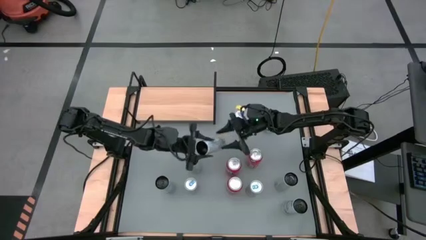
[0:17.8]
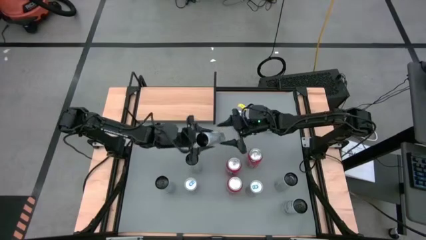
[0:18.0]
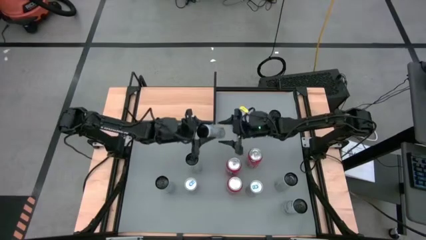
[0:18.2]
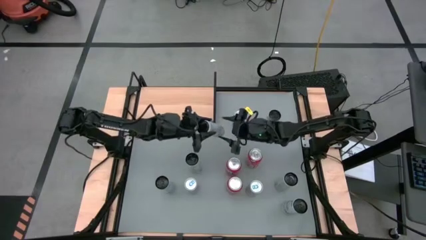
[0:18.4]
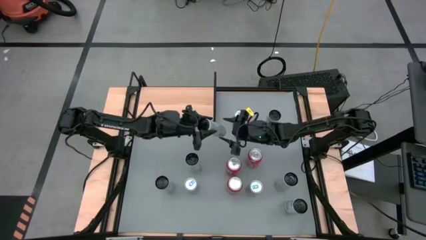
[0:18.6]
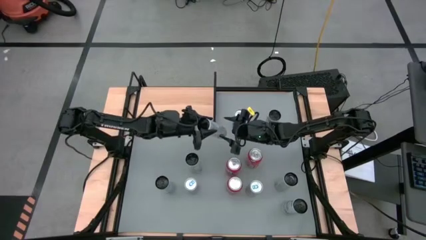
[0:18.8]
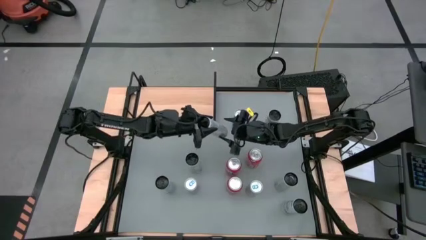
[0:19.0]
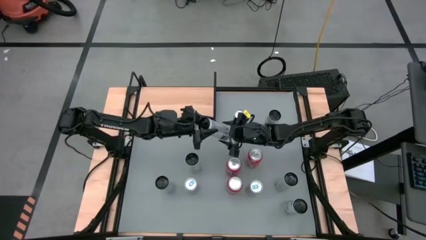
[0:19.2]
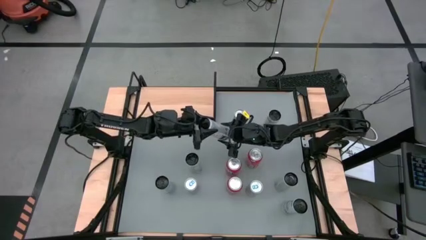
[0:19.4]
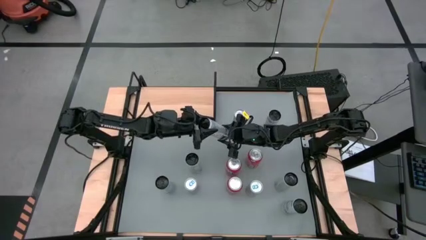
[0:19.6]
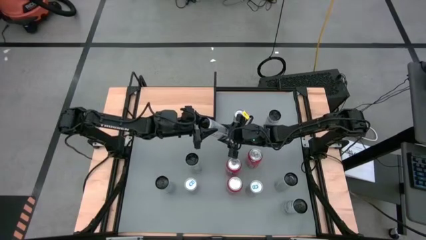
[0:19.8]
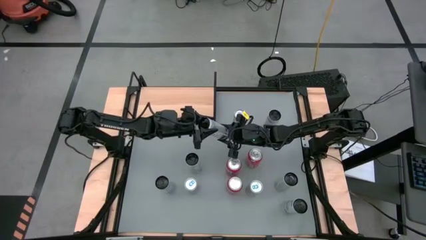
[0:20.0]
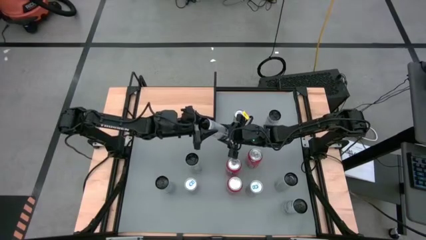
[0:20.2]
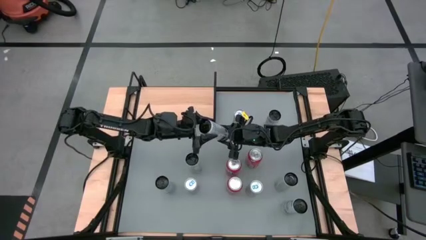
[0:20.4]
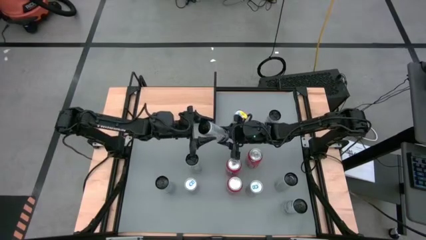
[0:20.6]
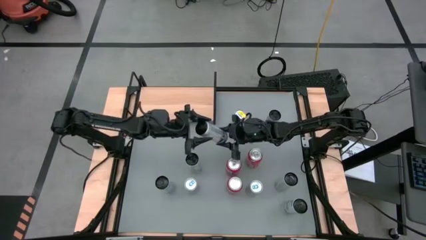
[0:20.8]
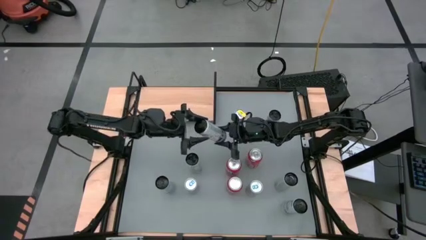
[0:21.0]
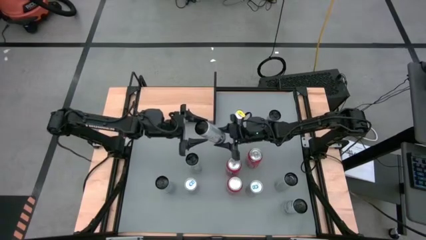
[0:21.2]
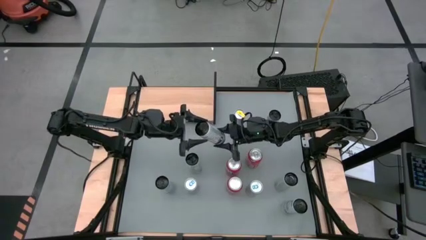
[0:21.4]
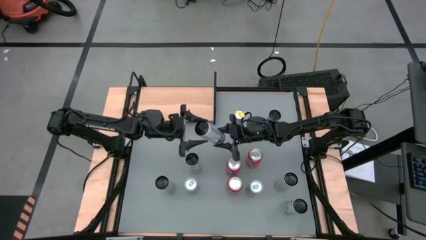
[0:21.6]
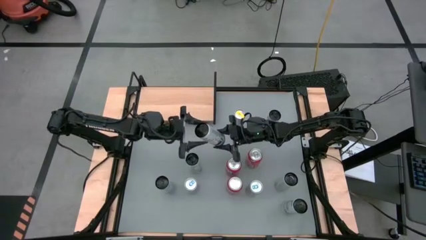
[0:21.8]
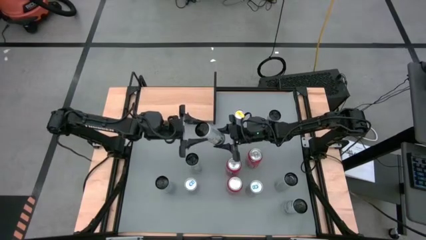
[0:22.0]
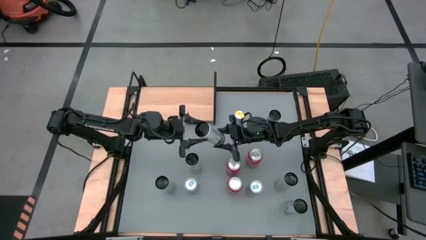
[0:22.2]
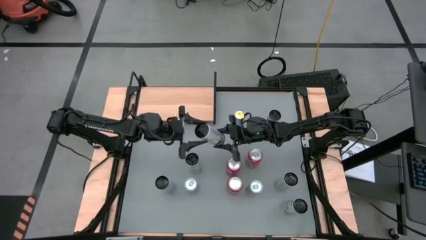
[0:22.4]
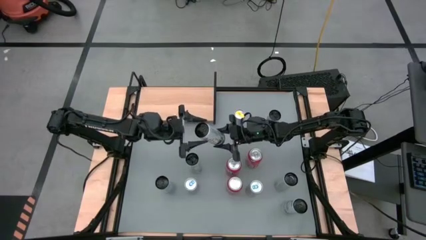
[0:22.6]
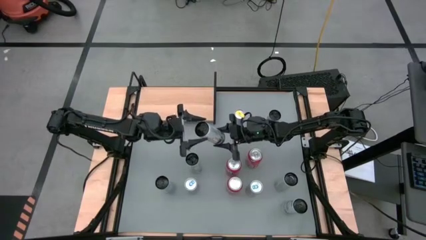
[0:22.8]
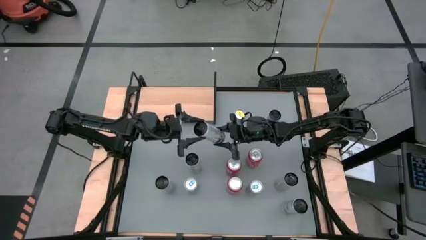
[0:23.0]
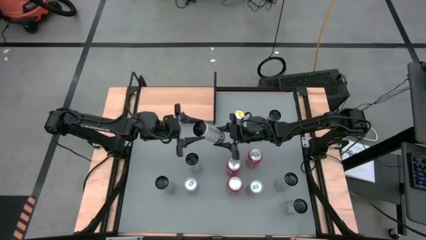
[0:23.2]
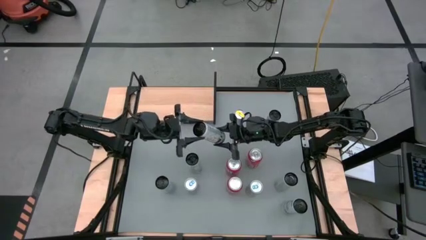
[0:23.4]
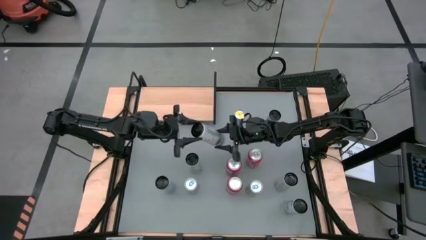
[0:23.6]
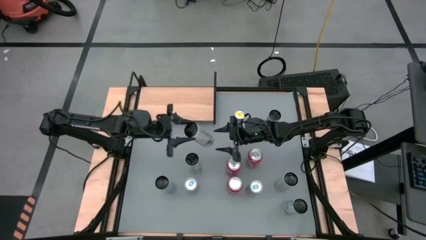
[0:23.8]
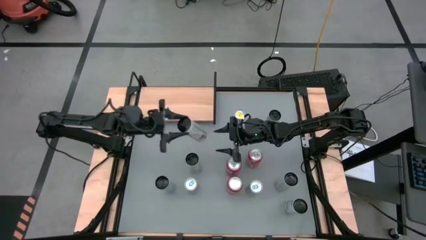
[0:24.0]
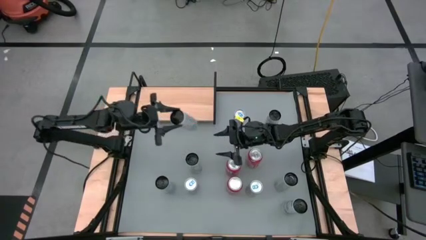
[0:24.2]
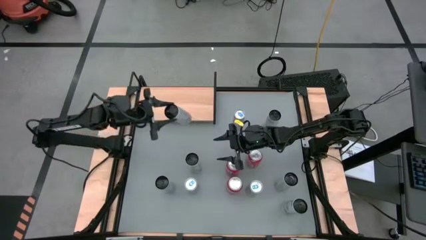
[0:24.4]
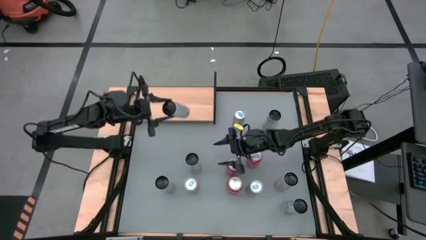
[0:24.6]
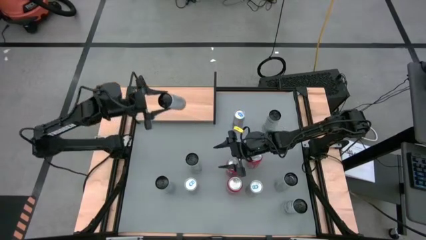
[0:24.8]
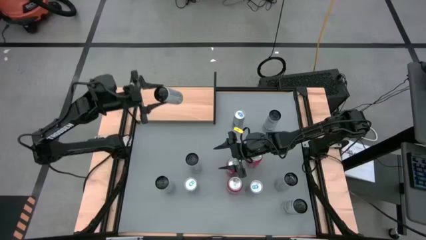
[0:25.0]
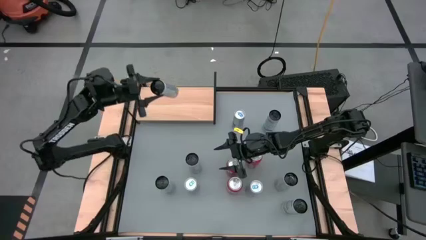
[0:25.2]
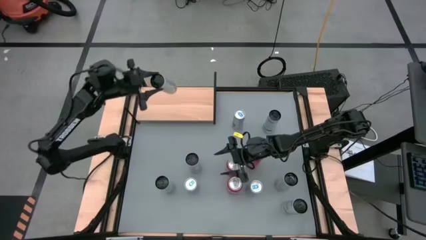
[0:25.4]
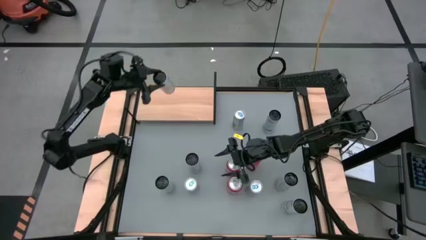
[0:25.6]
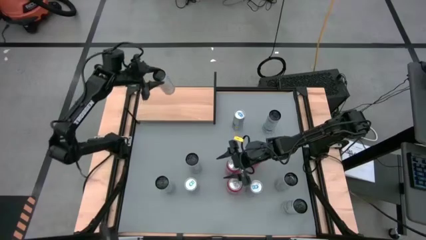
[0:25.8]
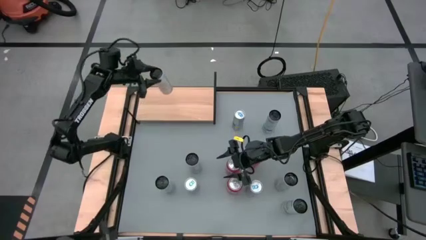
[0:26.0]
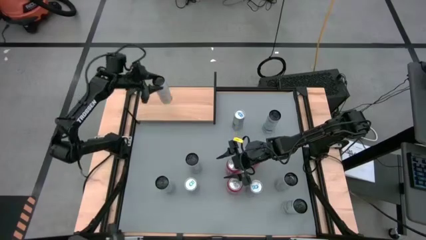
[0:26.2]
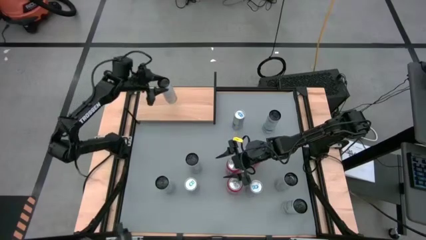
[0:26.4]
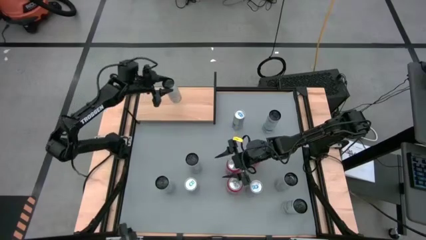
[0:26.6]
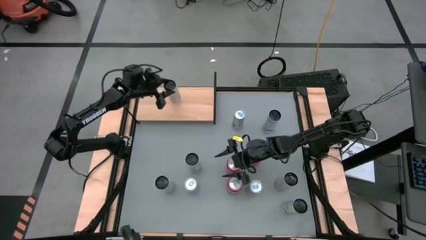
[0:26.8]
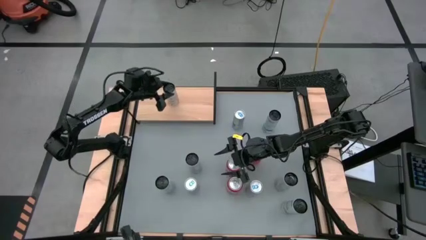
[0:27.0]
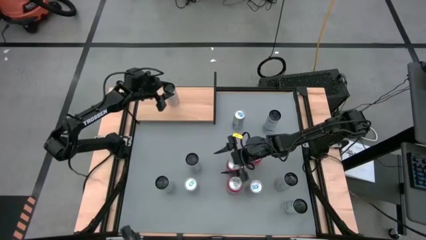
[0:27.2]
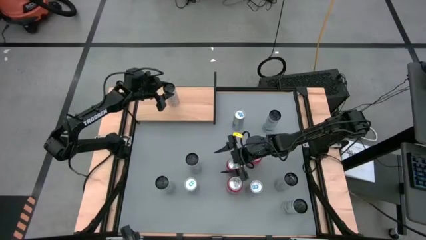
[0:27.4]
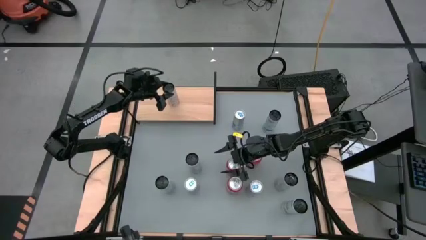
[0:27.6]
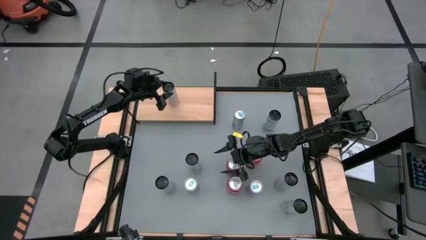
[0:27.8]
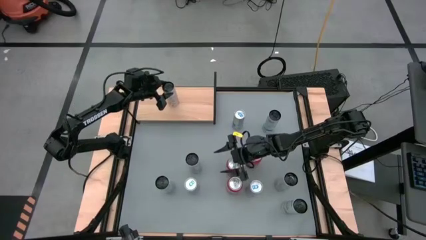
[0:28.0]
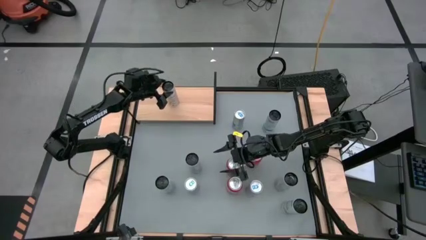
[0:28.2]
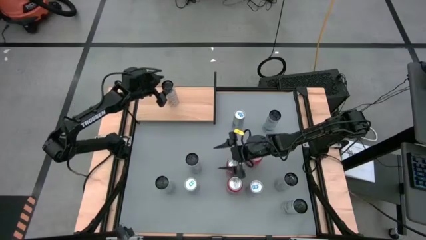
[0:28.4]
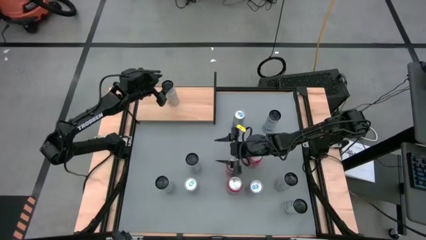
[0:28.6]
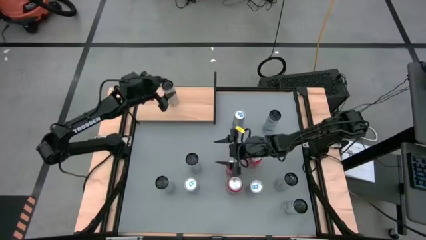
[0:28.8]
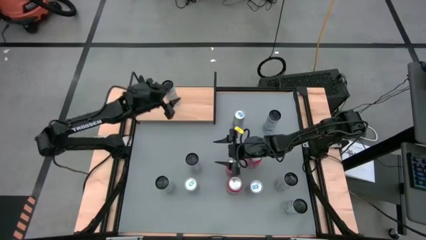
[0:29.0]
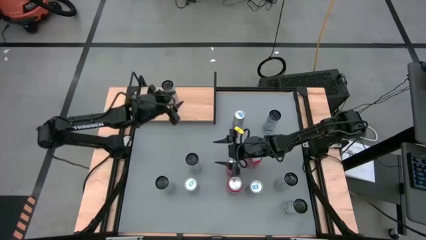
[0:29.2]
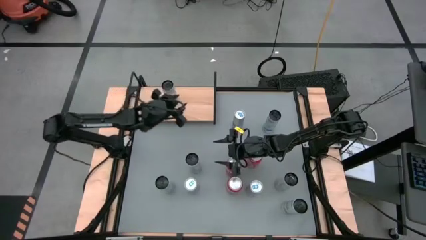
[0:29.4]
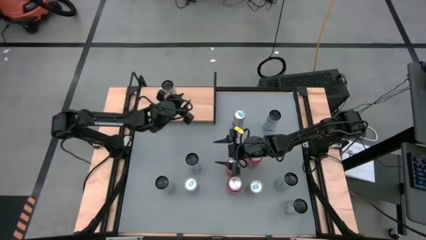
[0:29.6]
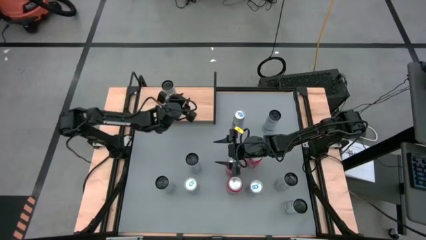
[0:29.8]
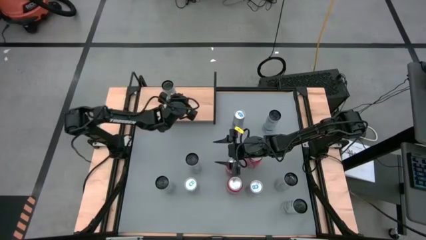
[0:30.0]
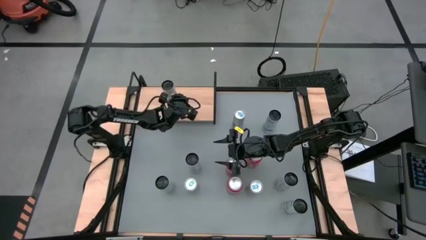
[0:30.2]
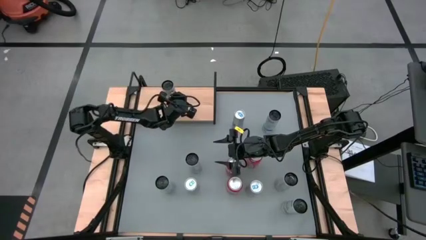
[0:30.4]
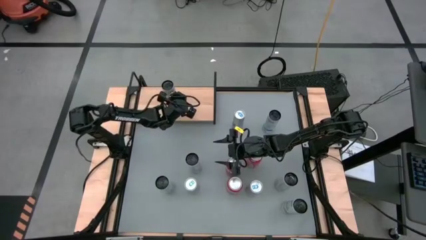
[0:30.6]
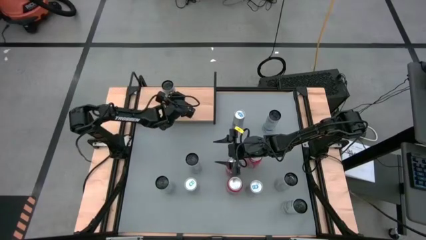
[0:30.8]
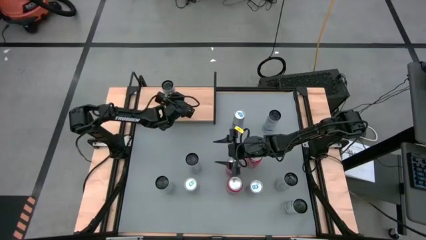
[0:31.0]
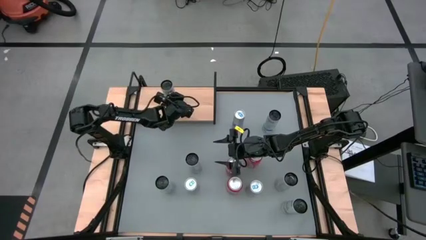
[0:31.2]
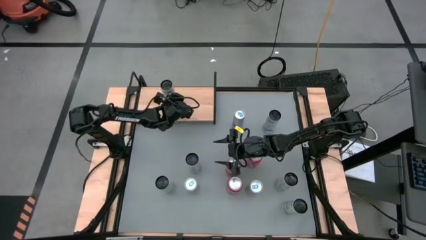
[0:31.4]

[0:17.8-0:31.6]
Task: Place canned beverage on shelf
Put the top left white-yellow soda can on the shelf
